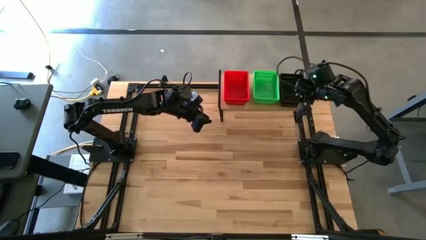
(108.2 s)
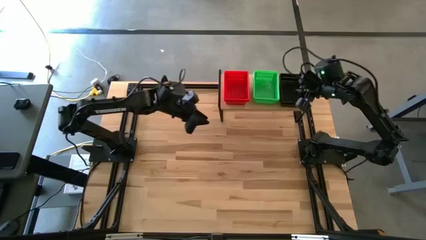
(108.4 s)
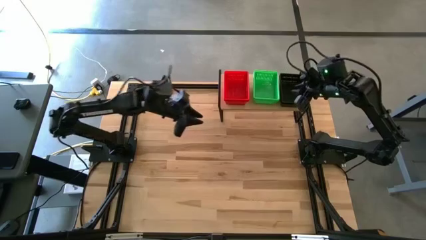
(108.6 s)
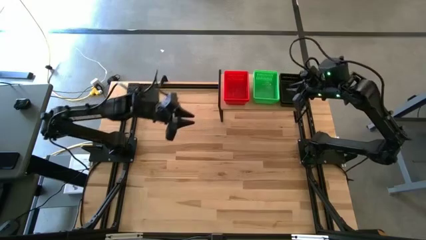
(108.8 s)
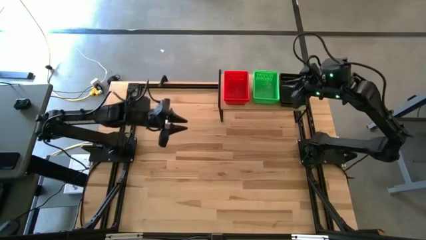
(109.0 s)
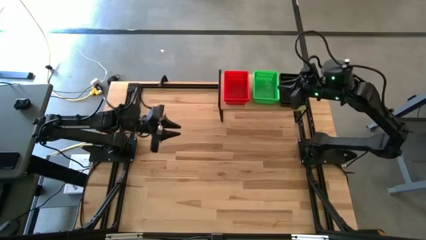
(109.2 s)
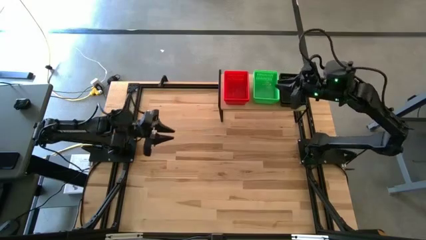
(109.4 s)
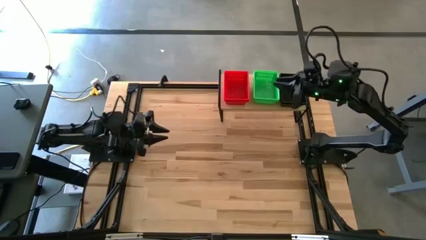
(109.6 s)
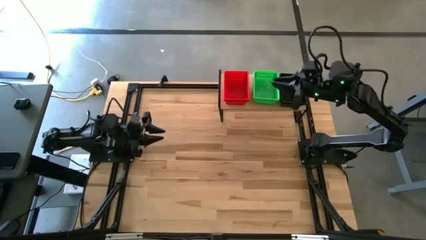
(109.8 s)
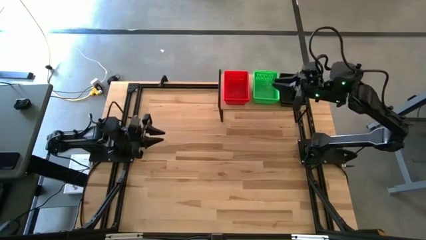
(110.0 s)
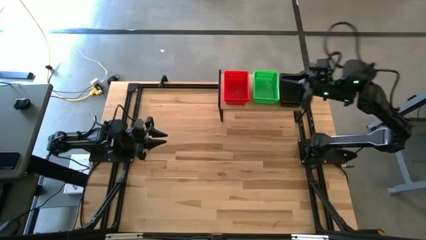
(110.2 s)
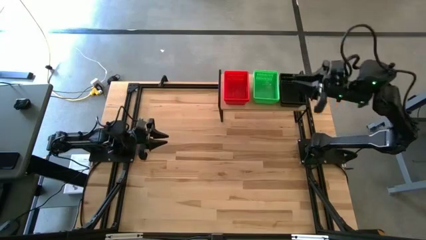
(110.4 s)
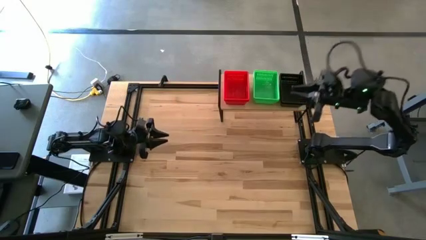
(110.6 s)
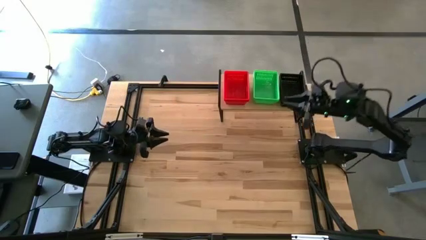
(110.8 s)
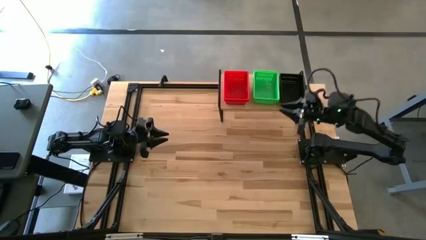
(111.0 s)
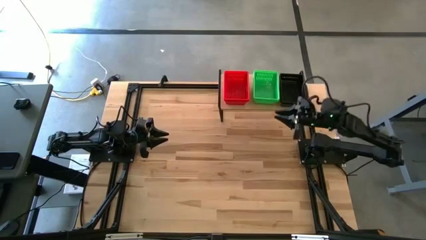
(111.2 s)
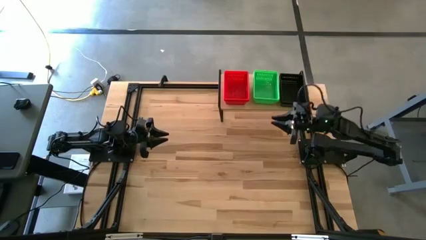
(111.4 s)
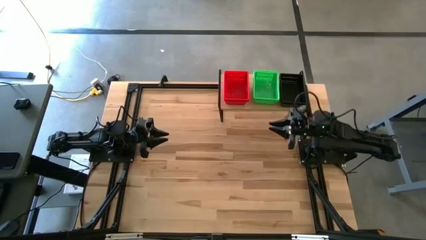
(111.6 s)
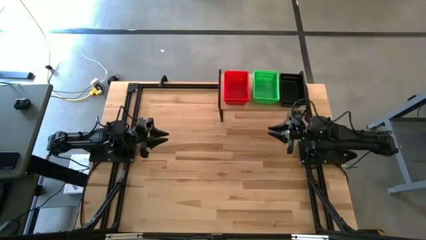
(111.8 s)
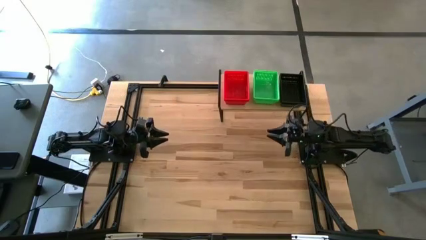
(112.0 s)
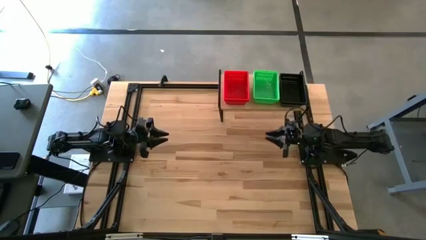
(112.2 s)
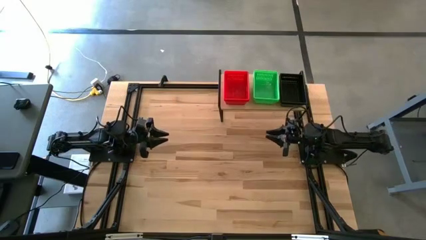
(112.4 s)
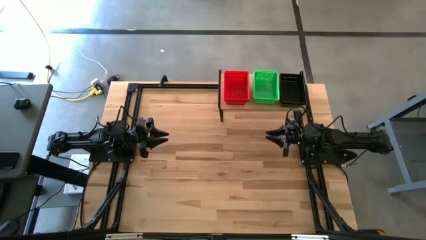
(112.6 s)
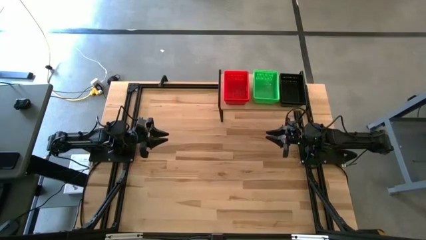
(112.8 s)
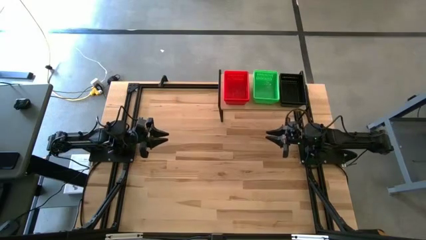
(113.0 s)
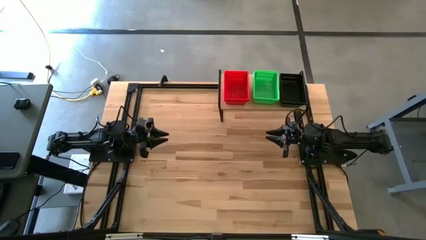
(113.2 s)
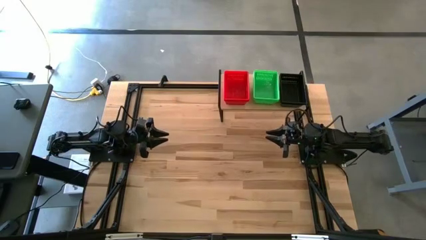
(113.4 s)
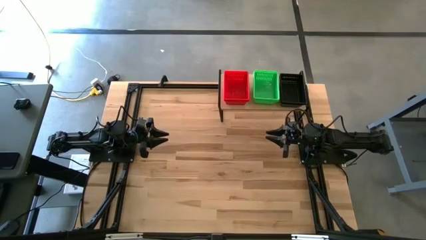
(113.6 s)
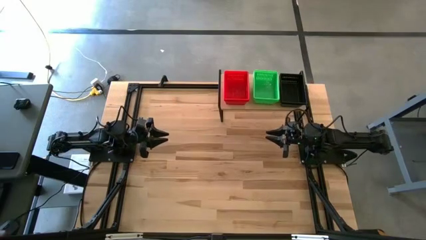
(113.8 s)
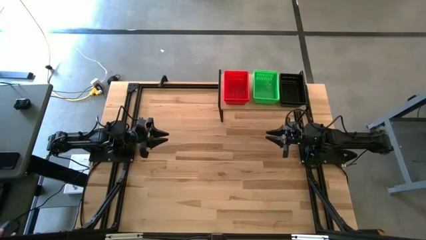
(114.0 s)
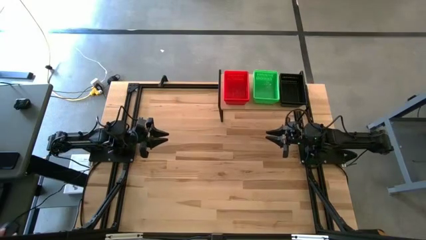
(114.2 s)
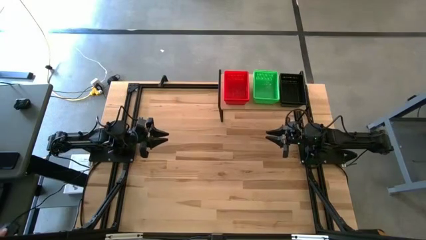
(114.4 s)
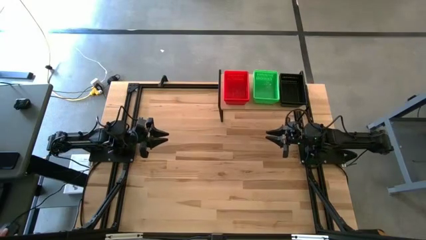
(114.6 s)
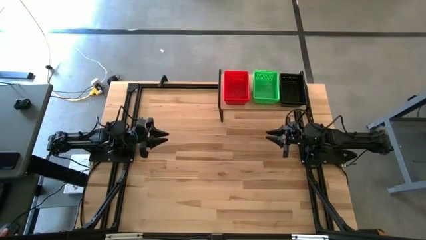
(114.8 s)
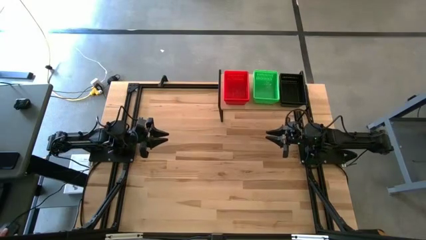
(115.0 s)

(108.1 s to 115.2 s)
Task: Stack baskets on shelf by color
Return to Home Position

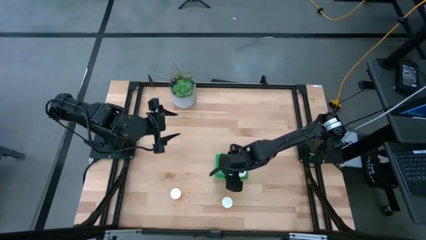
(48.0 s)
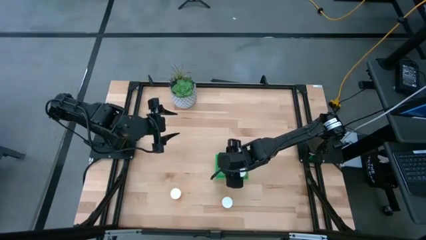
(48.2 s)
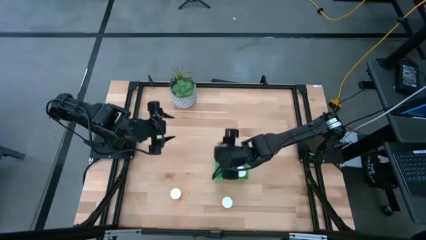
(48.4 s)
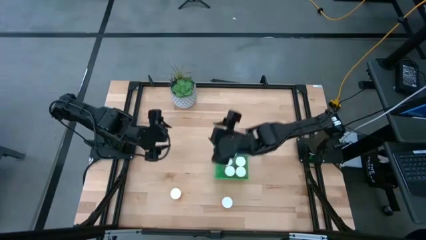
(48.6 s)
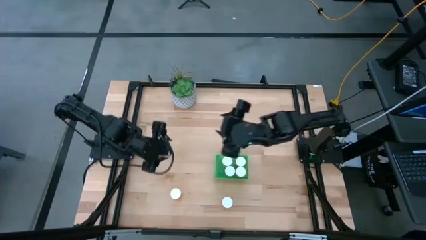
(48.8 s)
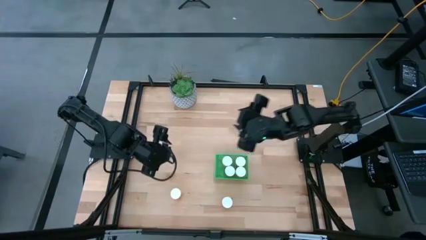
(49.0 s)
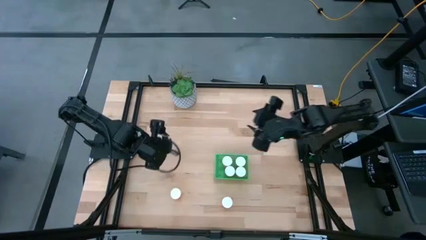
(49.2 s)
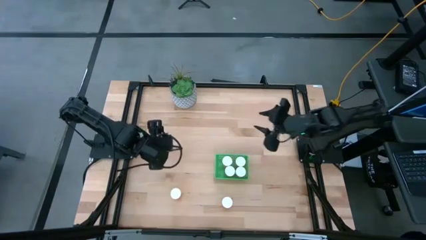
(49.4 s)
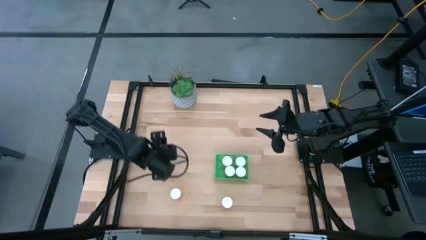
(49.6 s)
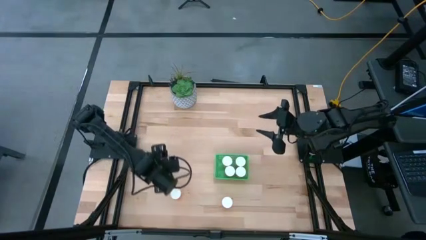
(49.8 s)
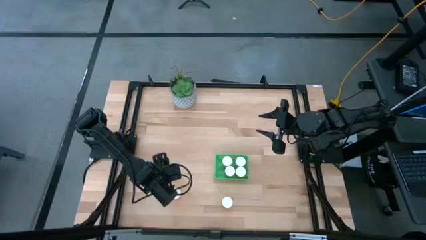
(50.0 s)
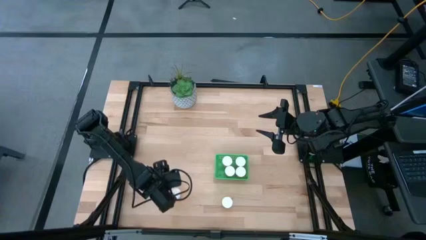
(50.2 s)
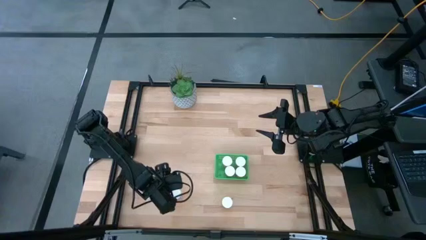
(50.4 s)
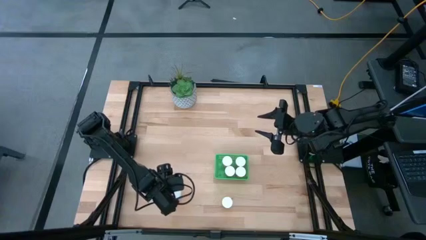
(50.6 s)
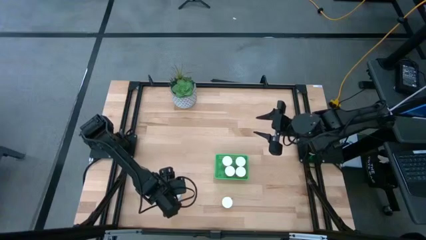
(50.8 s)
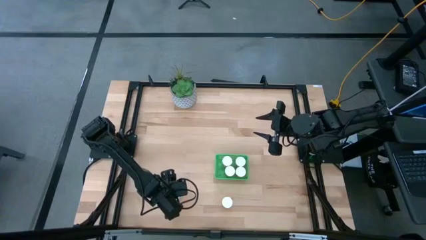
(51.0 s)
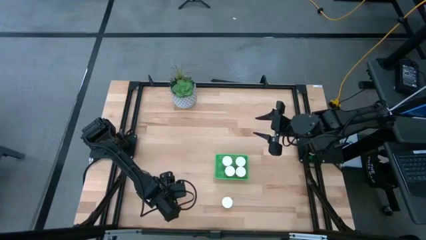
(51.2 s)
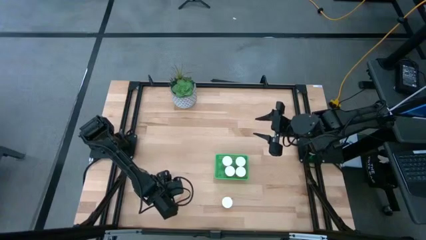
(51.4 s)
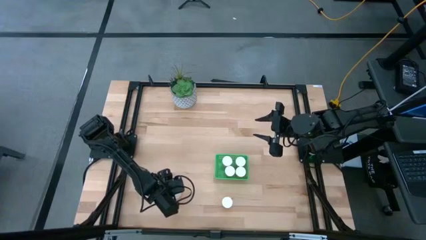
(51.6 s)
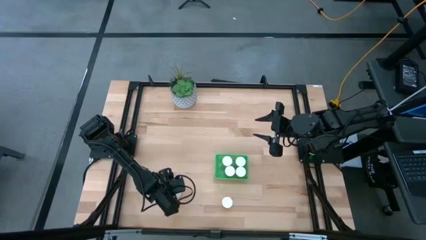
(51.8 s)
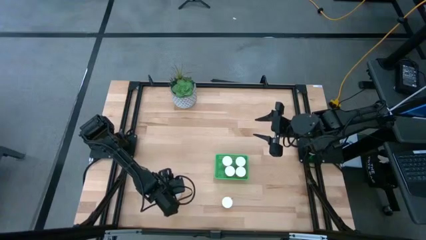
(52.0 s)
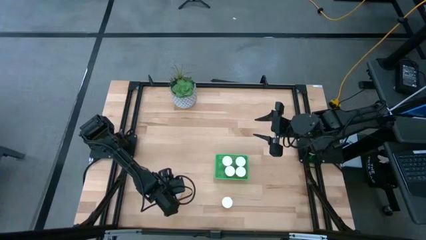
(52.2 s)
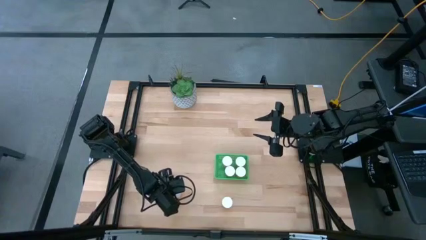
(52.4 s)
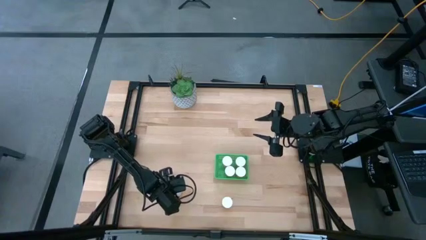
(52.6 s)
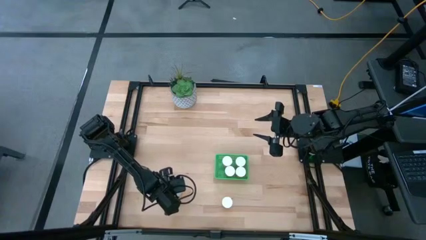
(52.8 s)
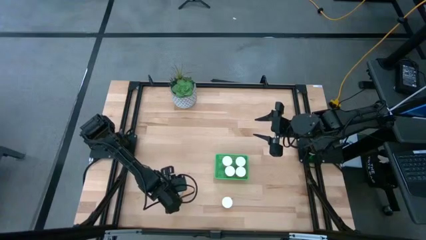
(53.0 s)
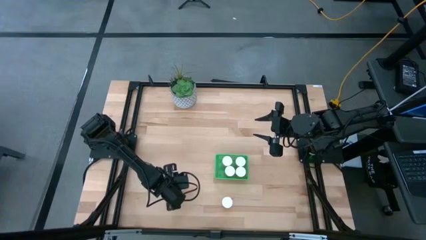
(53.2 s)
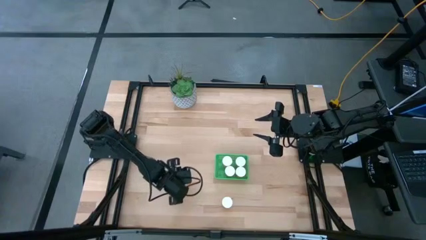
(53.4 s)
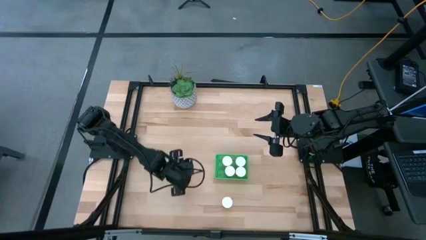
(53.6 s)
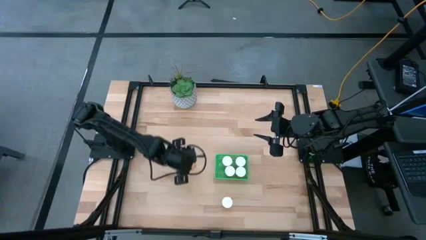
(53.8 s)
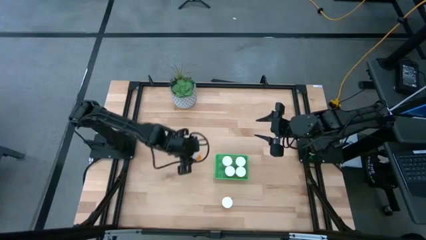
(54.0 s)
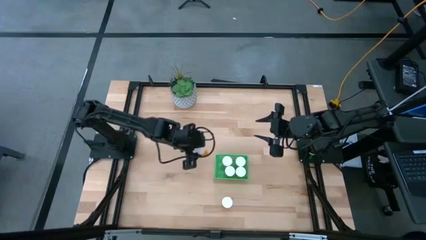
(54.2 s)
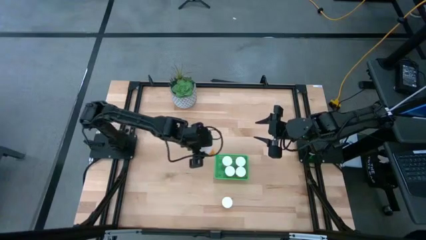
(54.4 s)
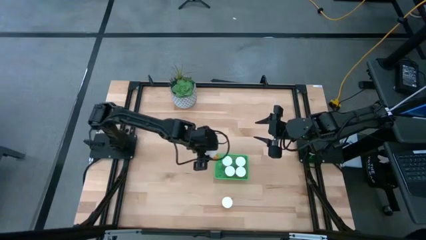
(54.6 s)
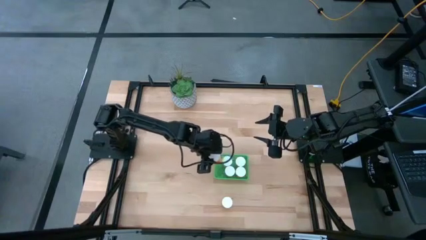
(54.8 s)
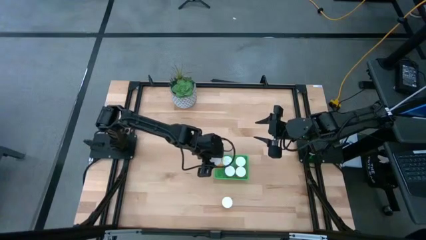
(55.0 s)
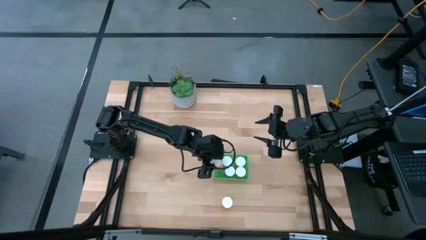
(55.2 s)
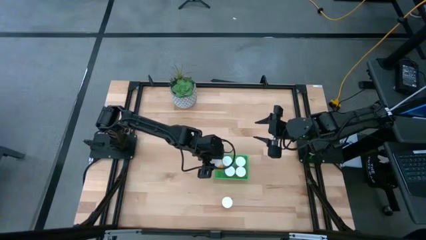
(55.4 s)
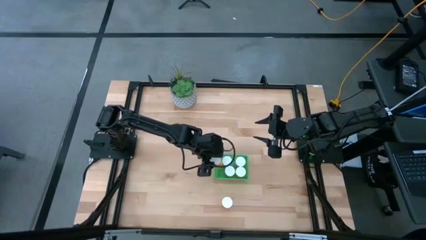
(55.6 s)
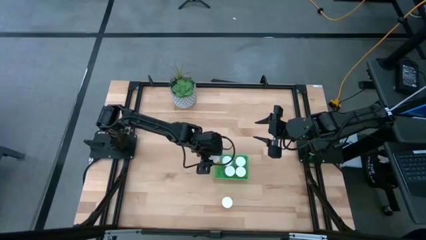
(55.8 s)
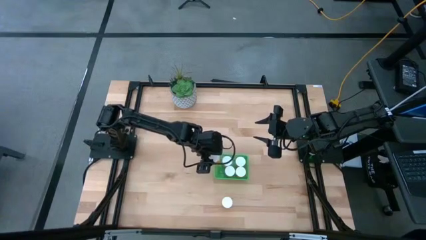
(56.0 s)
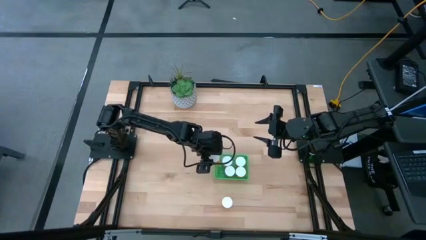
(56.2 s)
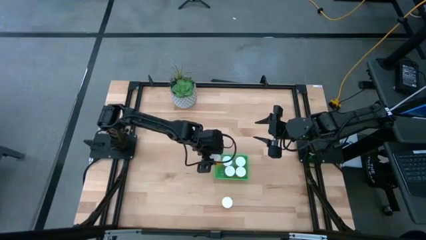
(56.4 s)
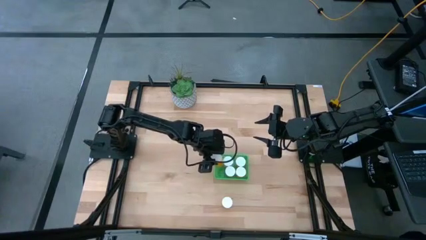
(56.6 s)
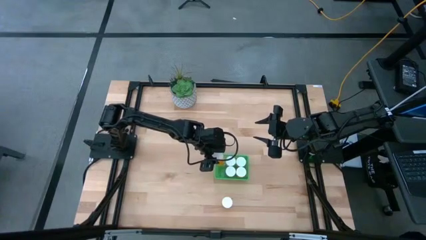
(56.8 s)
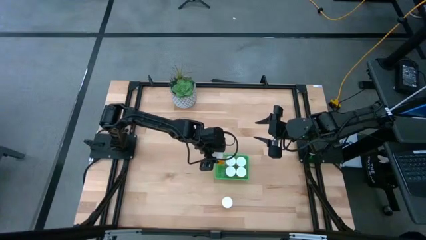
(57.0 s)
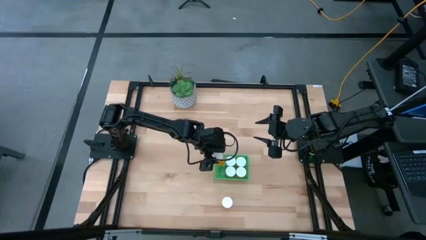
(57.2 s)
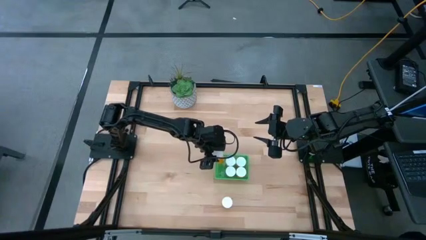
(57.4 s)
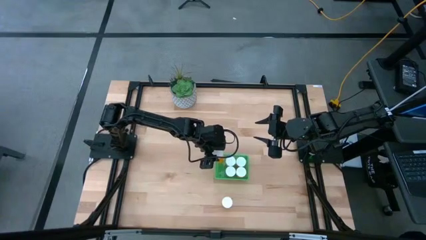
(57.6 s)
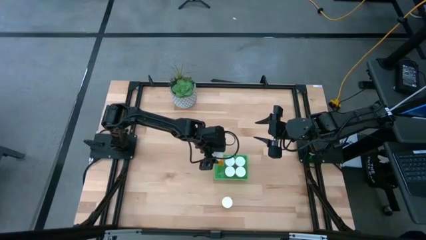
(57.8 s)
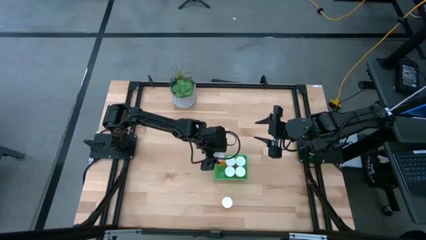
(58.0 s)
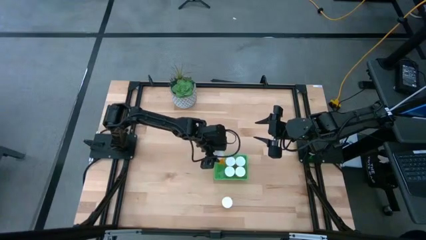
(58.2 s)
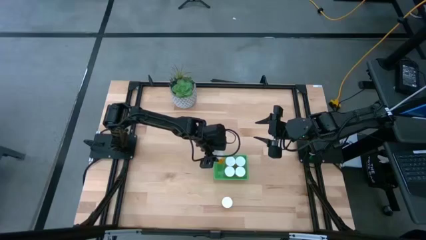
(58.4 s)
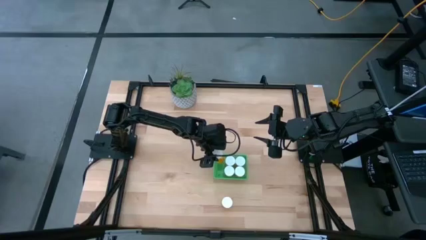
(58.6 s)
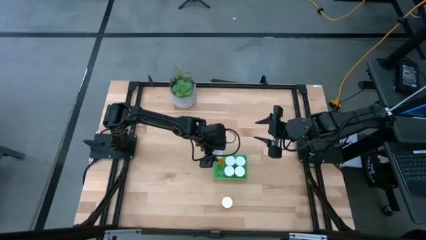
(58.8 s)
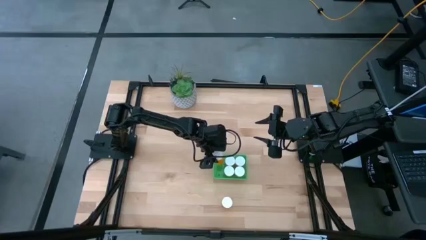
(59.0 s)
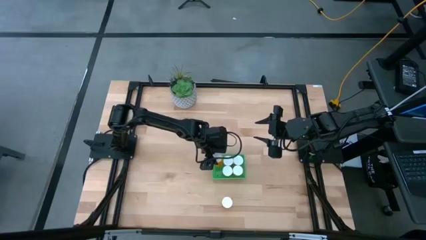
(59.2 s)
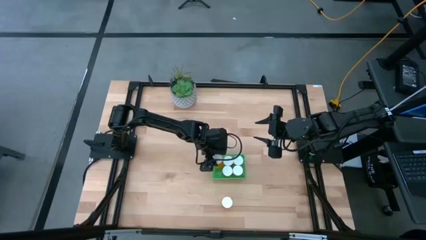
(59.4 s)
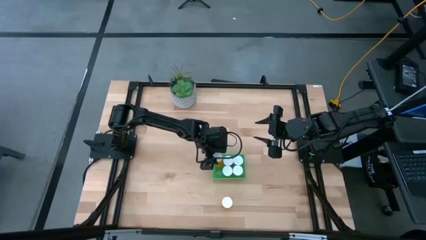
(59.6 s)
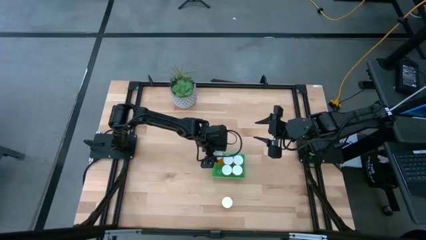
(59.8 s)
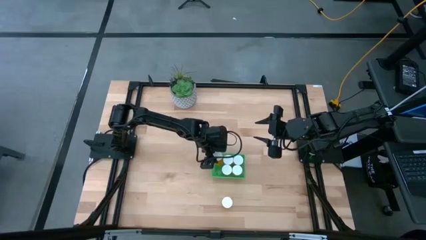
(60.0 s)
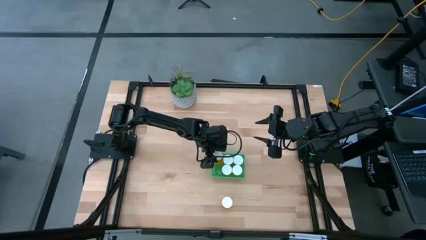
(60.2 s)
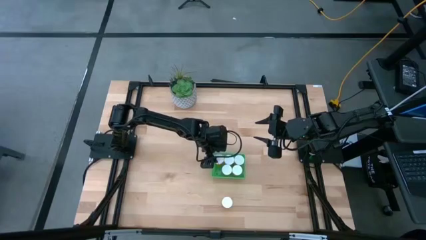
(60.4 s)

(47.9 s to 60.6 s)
Task: Pick and place pill bottles into a basket
Put the orange pill bottle into the green bin
